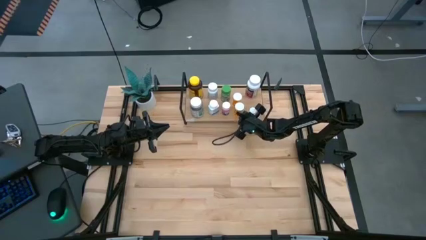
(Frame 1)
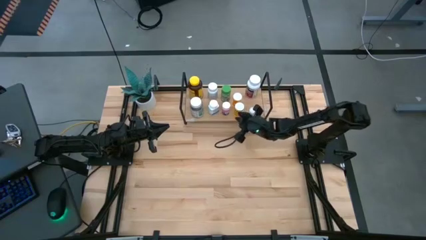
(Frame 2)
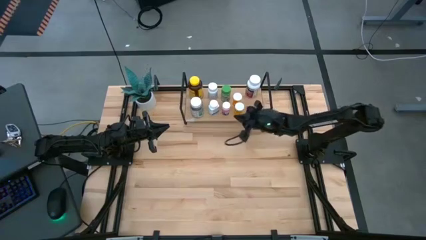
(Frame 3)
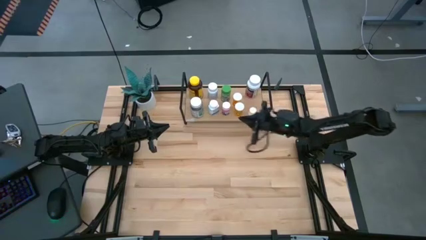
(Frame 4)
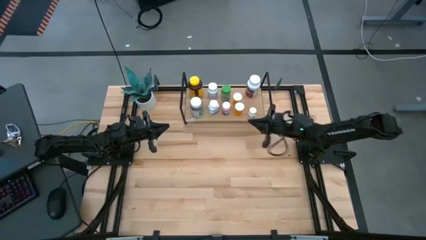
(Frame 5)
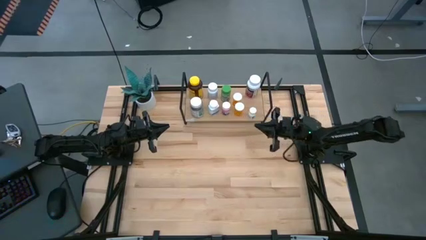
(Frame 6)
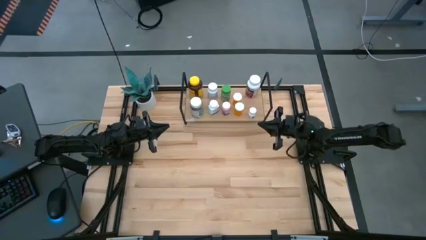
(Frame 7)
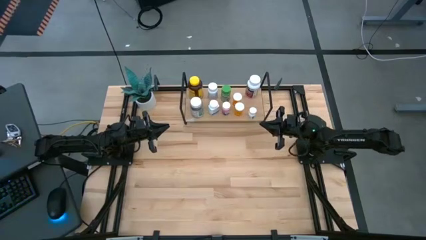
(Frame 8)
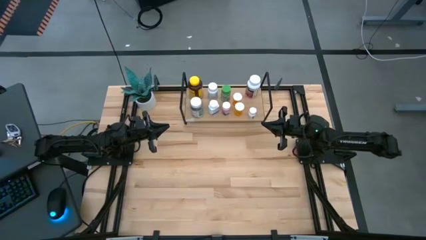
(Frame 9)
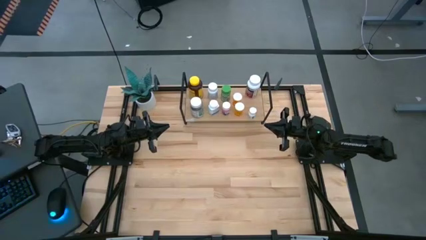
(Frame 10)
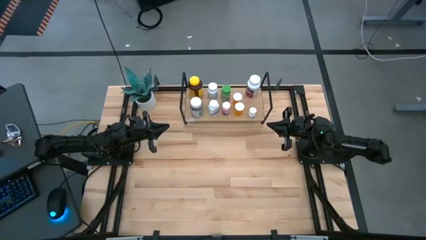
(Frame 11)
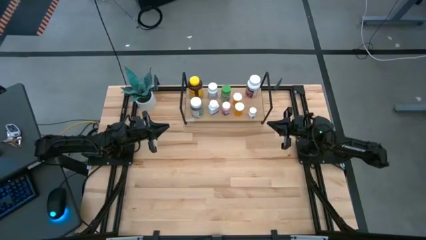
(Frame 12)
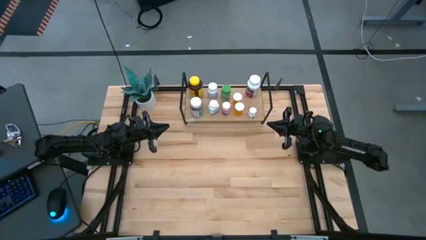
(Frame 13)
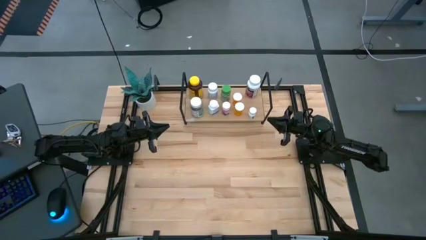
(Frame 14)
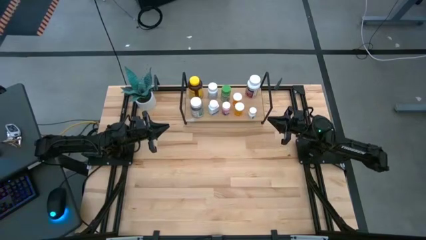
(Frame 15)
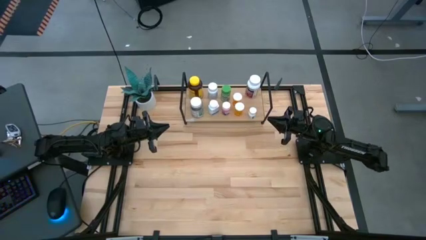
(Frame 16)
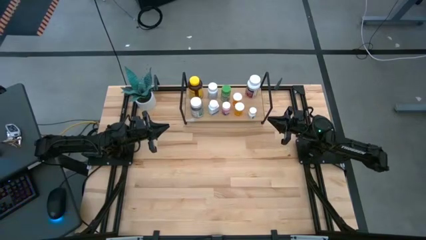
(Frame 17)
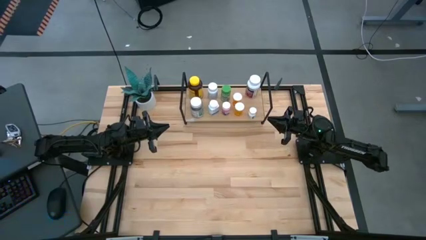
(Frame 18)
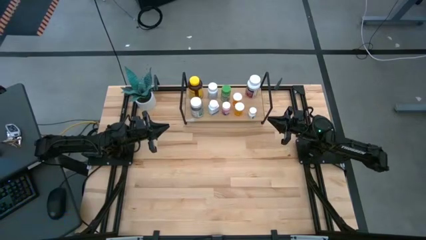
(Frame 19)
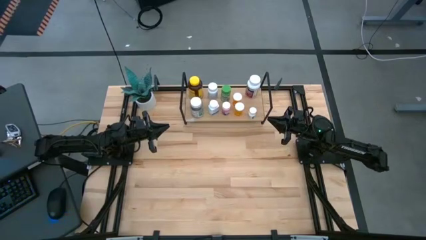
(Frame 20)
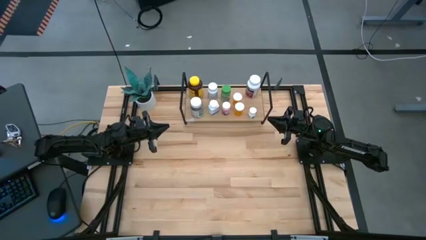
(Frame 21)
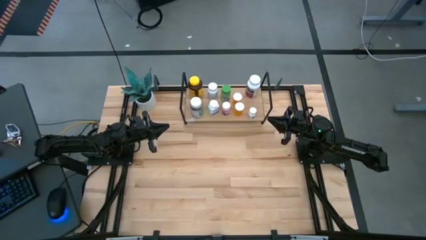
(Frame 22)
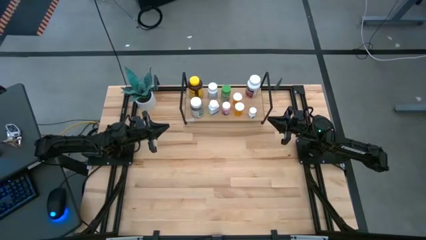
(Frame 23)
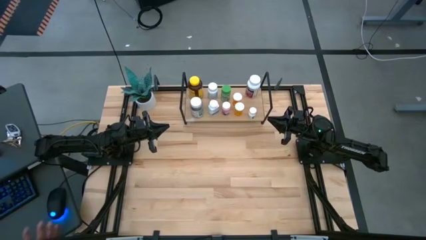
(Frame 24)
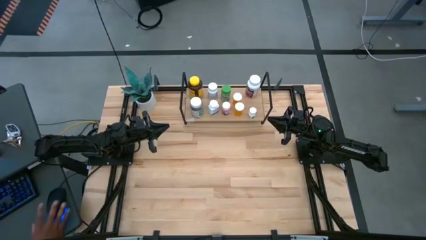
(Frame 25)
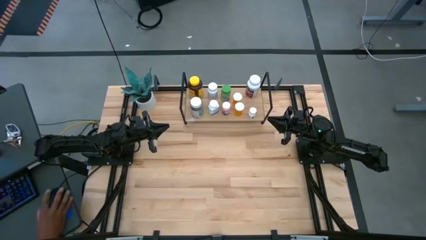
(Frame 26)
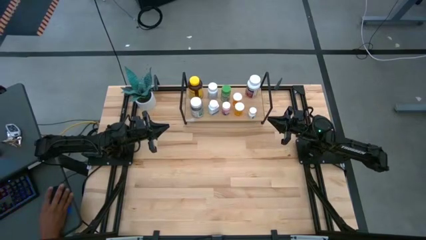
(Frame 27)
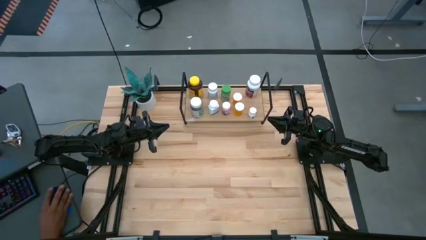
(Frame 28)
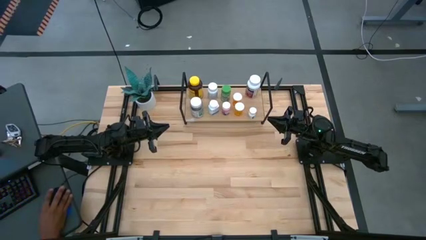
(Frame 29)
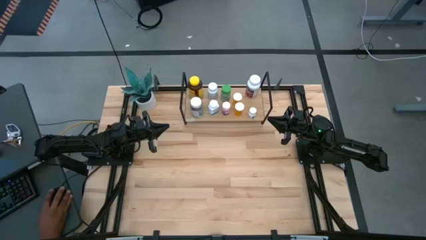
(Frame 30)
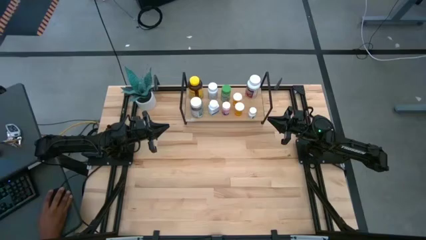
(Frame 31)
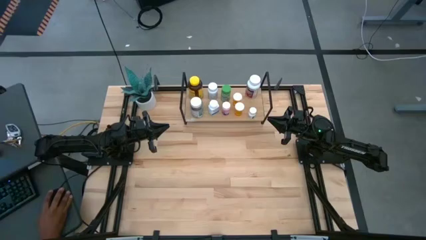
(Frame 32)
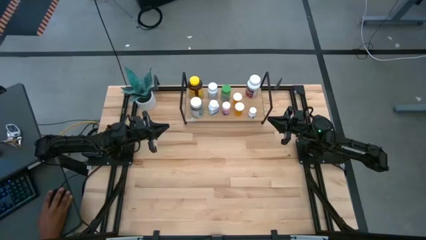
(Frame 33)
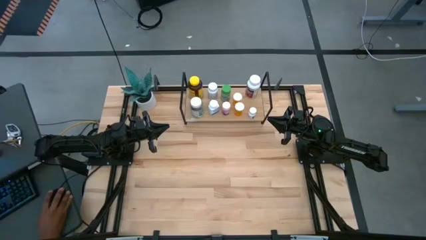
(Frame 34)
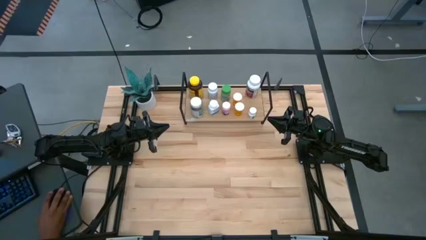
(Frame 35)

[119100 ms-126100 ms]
Task: Pick and place medicine bottles onto shelf by color
Return to Home Position

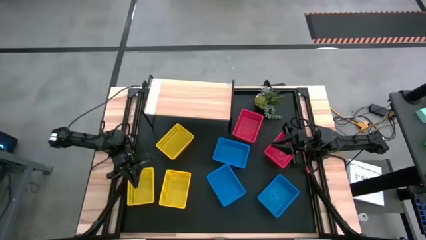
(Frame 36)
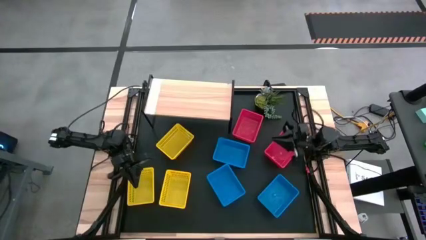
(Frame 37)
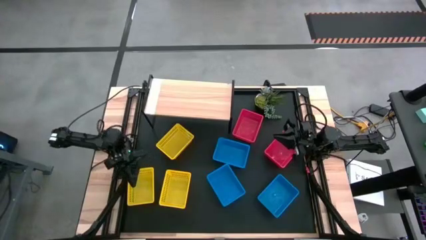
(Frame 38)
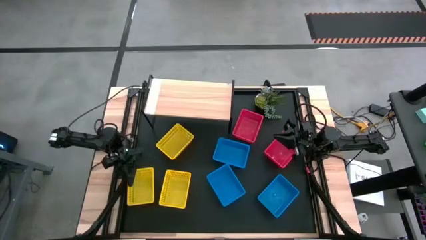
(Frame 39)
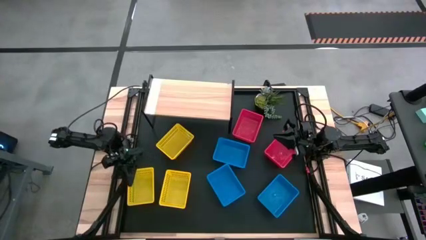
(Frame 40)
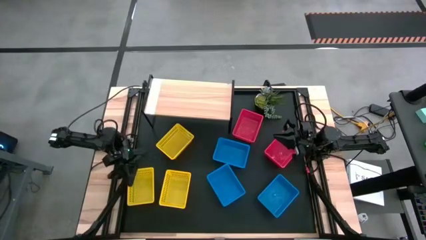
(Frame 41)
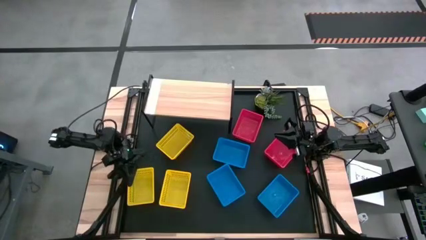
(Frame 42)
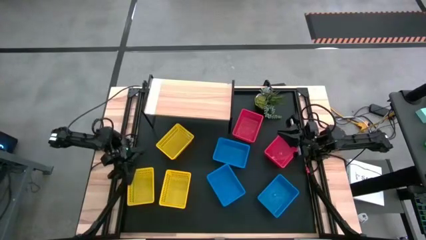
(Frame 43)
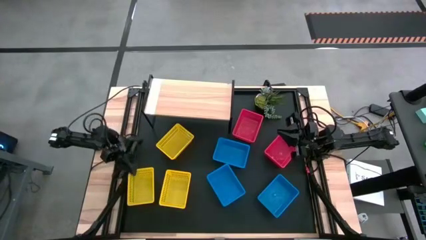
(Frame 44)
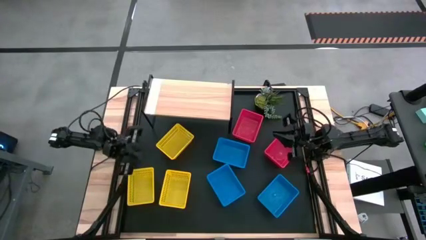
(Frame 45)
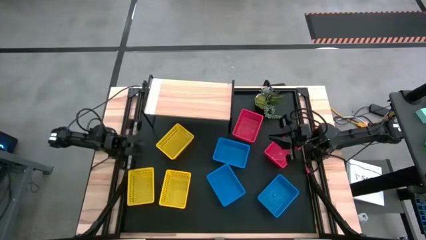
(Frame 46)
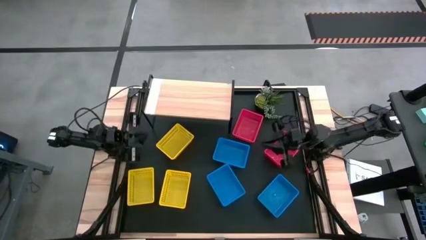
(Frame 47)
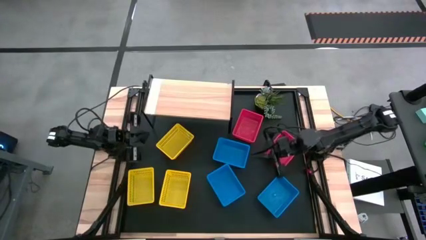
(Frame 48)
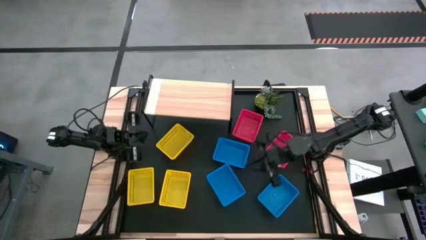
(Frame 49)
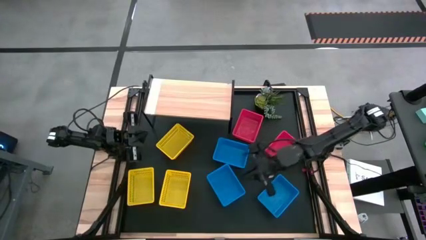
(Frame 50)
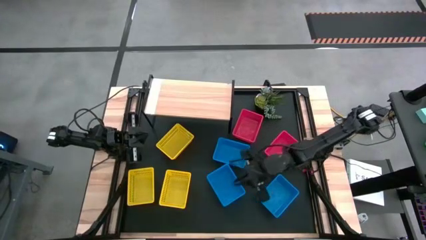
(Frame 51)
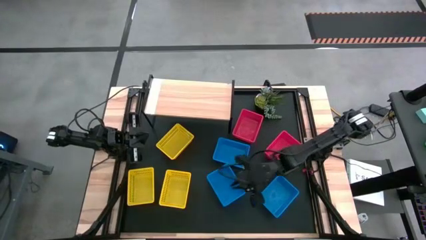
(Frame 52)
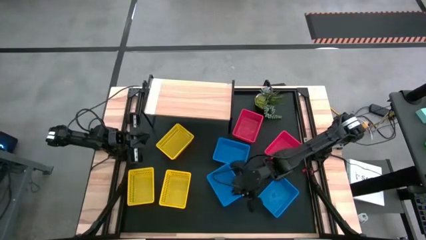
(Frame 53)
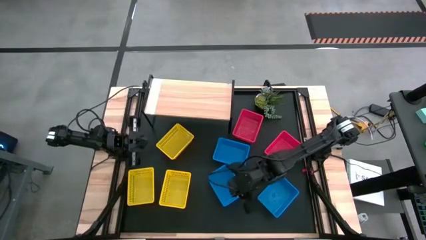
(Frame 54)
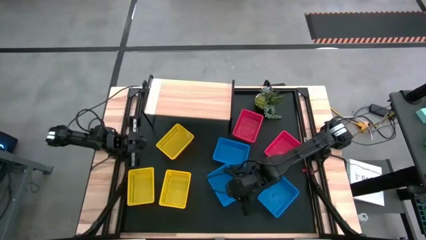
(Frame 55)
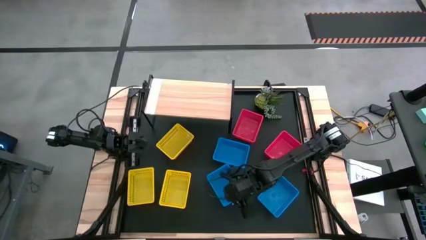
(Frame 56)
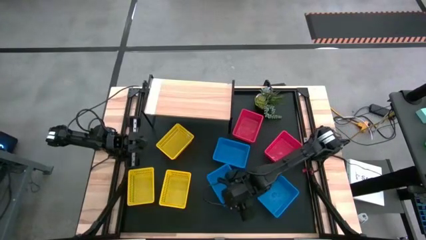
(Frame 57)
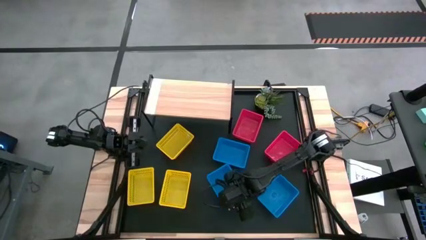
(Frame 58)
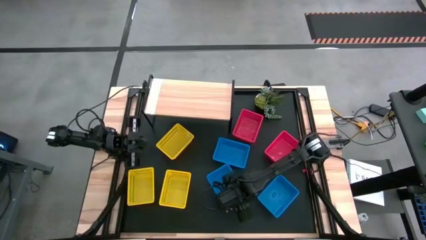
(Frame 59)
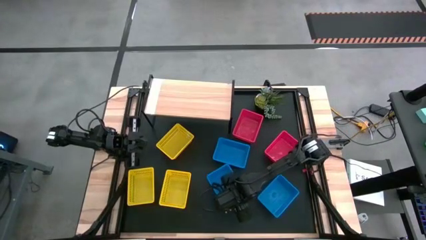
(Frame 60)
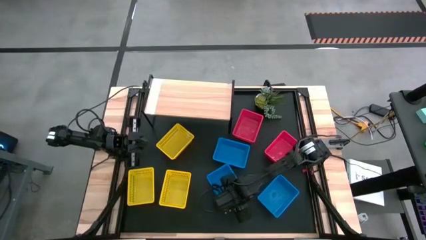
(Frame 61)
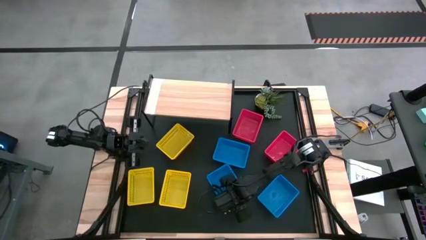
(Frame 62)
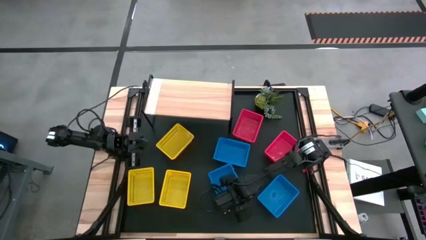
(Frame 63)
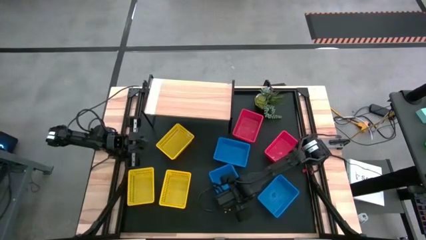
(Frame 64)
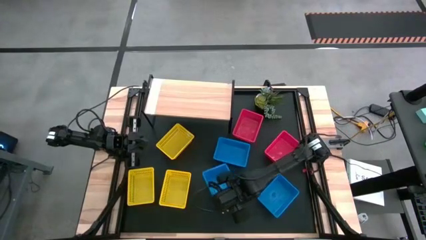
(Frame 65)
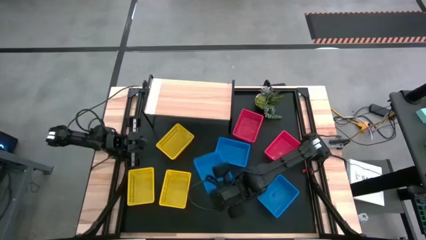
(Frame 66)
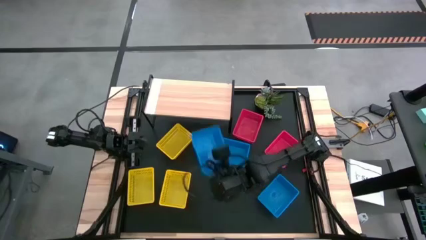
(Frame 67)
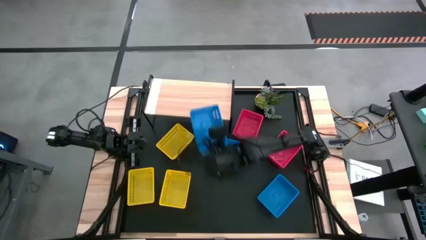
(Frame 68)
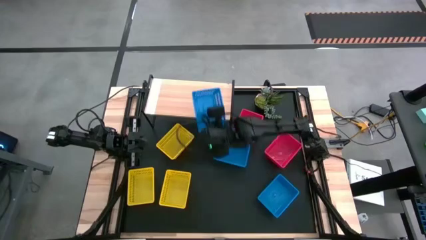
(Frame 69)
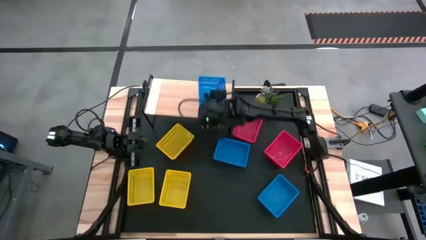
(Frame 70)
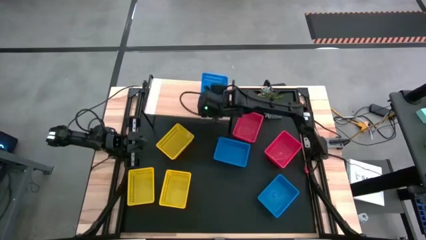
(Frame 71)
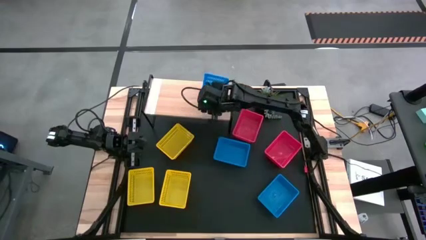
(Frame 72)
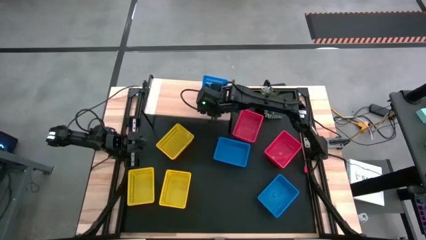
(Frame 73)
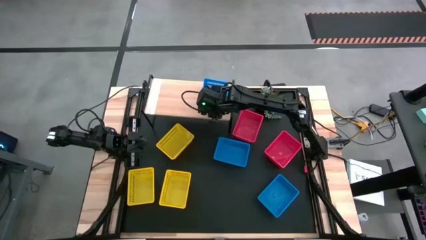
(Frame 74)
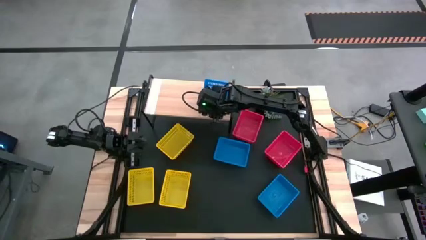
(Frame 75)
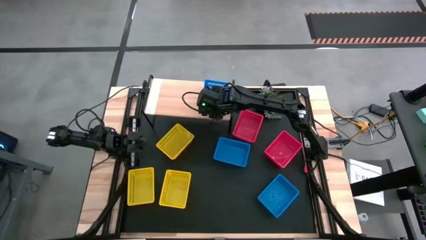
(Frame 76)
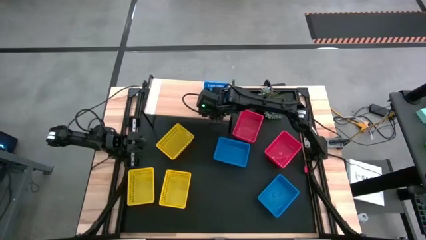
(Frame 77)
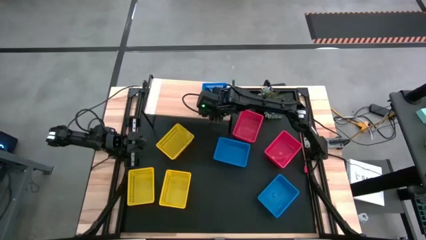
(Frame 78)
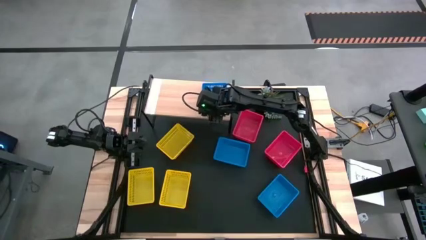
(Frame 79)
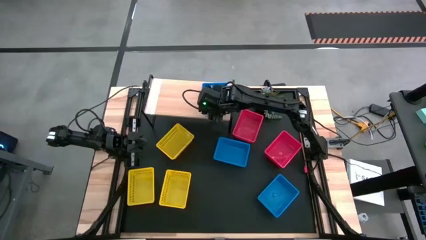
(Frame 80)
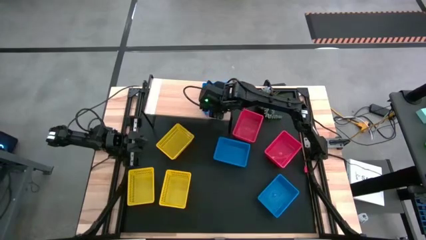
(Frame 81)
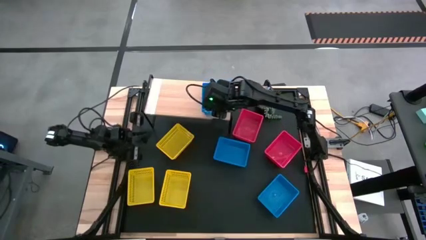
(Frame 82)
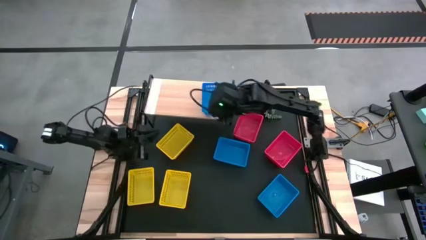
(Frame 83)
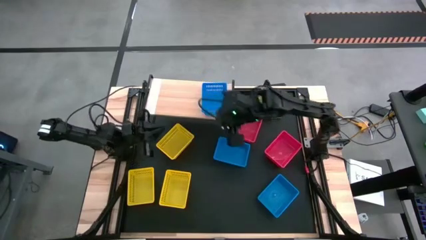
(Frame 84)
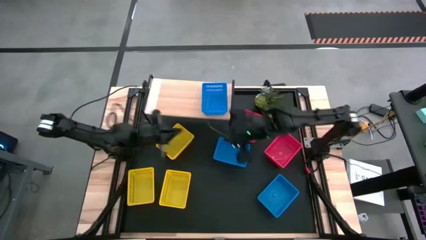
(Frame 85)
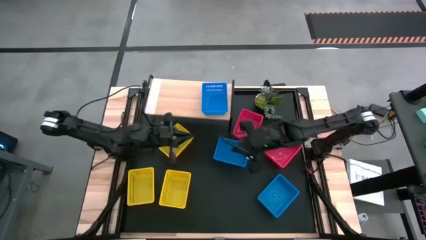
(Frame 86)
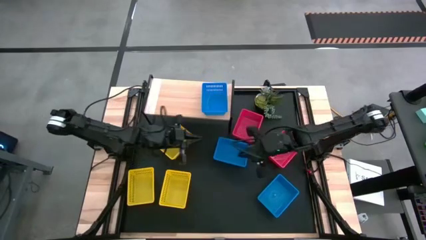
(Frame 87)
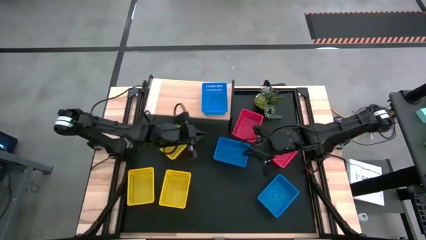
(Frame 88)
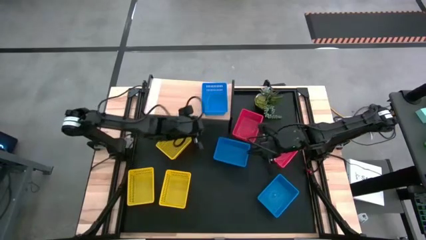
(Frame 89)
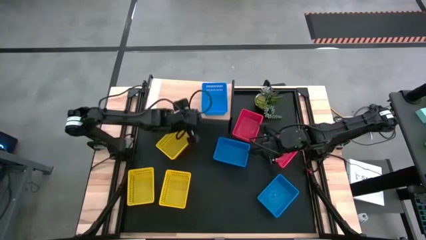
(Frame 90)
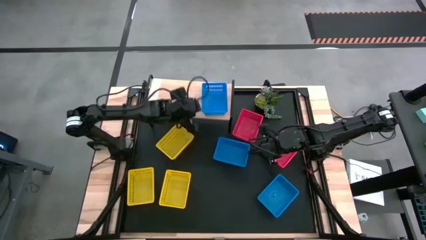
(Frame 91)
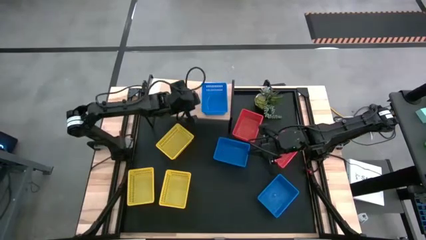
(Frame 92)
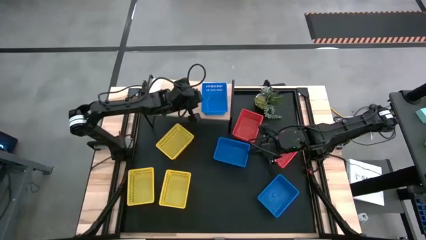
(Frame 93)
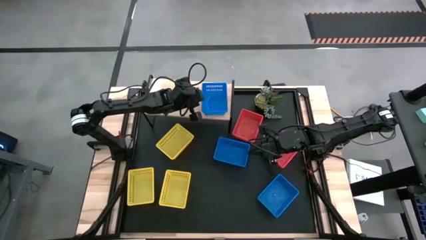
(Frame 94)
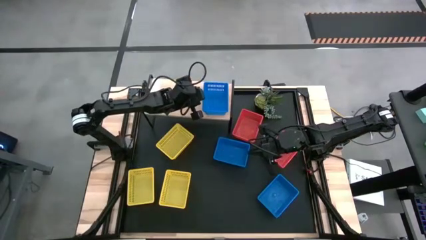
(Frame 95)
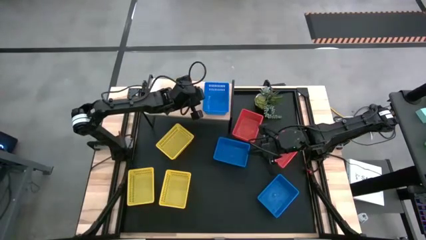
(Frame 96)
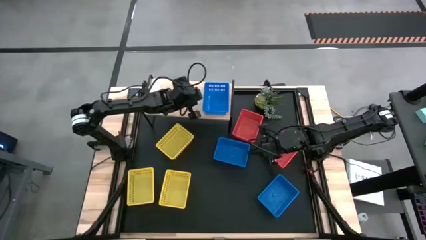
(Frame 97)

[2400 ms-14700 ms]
Task: Stack baskets on shelf by color
Put the bottom left blue bin on the shelf
